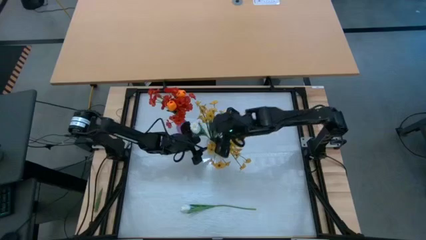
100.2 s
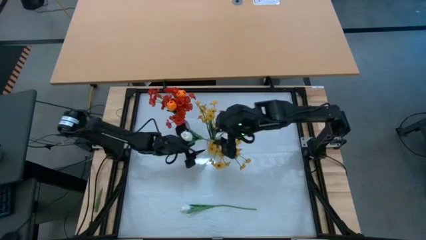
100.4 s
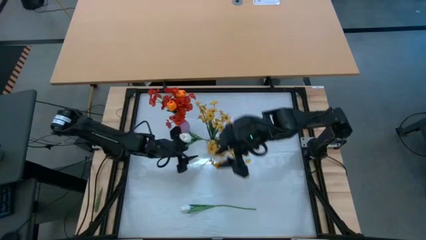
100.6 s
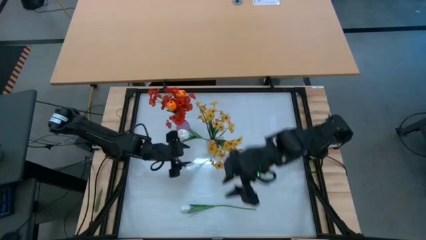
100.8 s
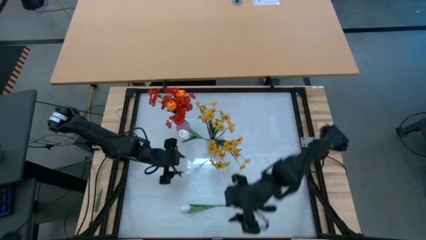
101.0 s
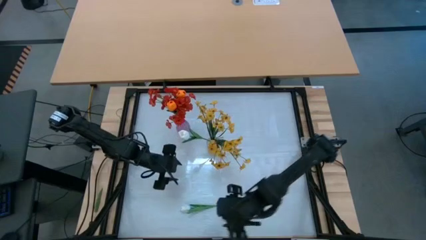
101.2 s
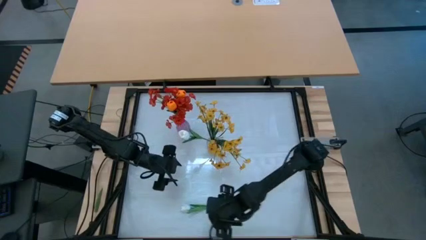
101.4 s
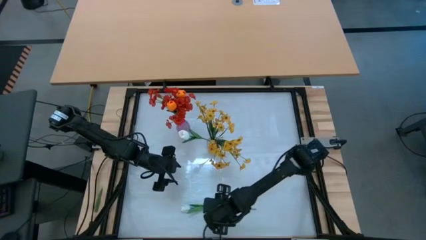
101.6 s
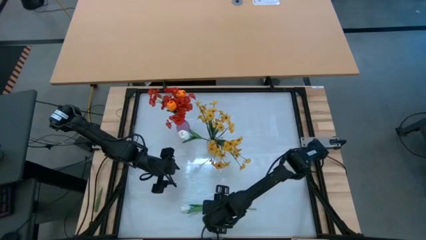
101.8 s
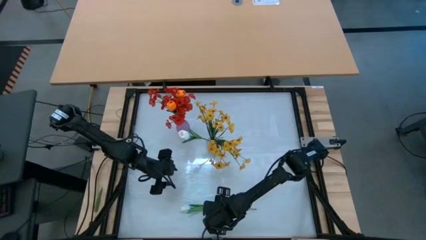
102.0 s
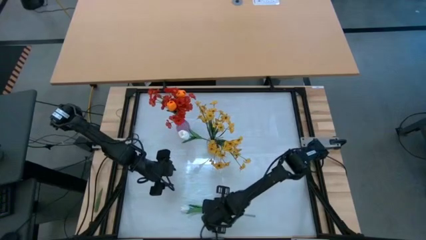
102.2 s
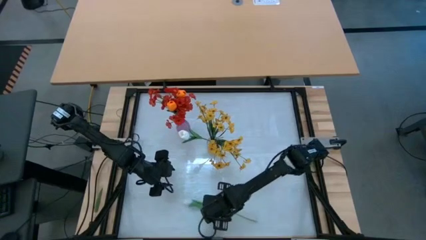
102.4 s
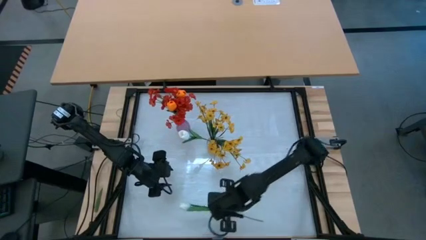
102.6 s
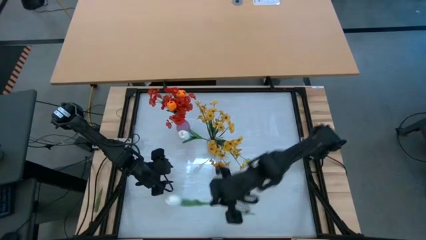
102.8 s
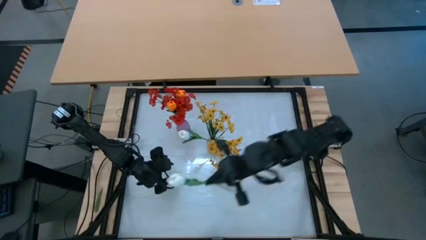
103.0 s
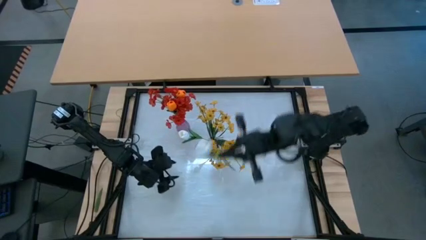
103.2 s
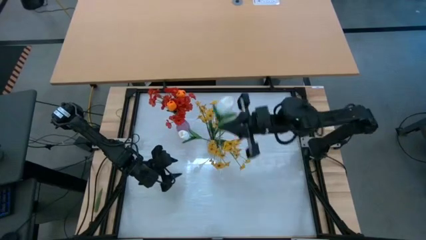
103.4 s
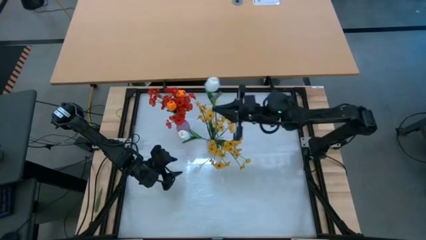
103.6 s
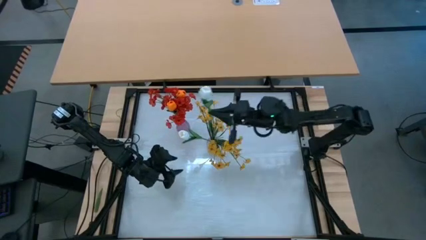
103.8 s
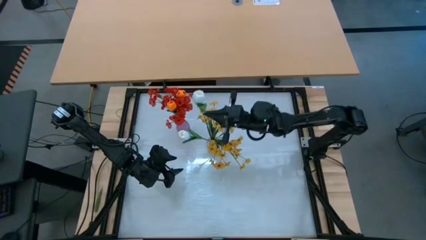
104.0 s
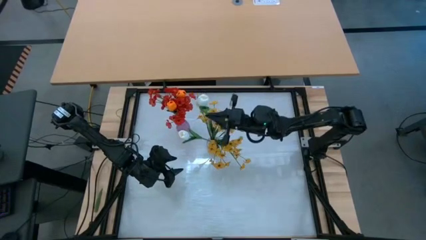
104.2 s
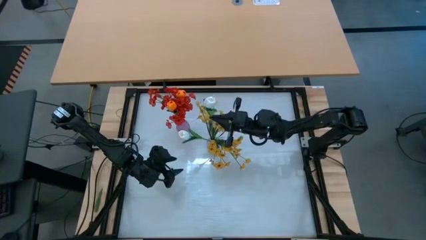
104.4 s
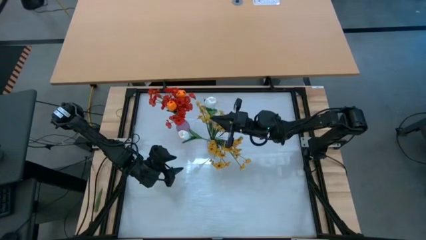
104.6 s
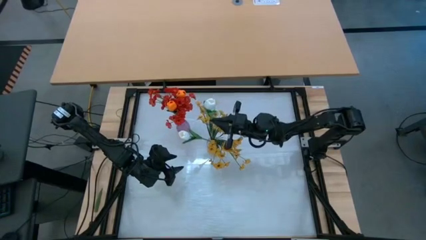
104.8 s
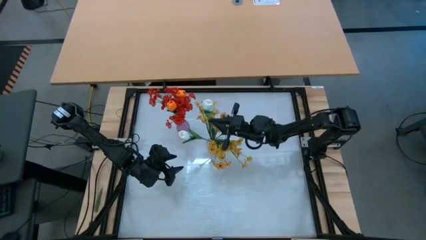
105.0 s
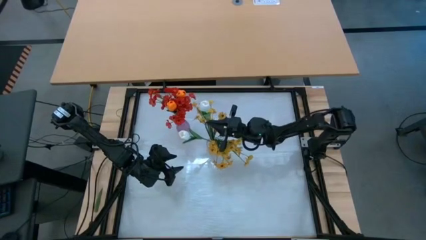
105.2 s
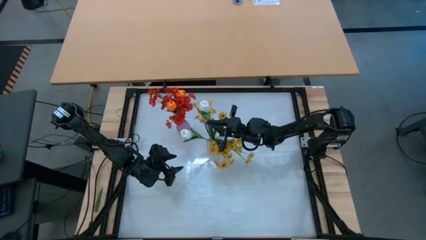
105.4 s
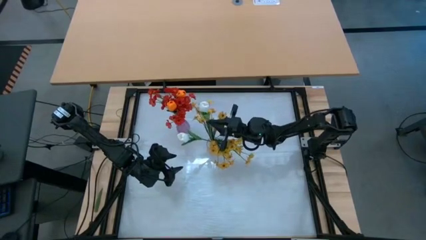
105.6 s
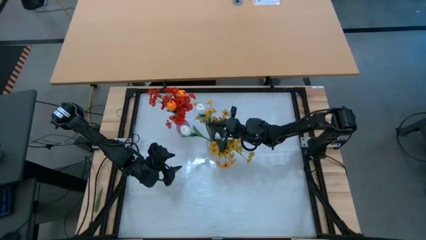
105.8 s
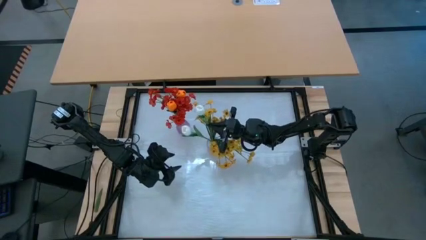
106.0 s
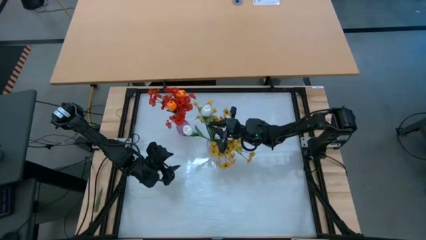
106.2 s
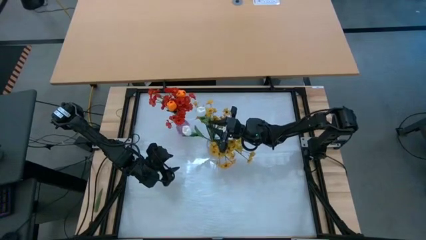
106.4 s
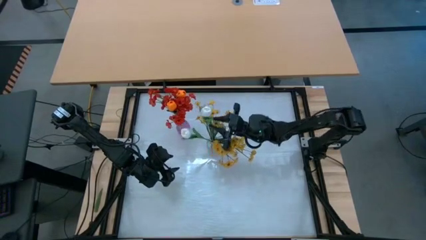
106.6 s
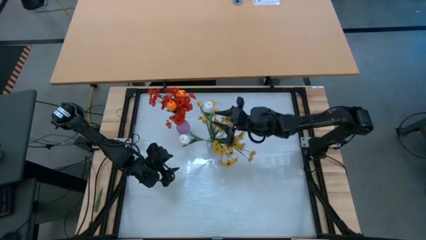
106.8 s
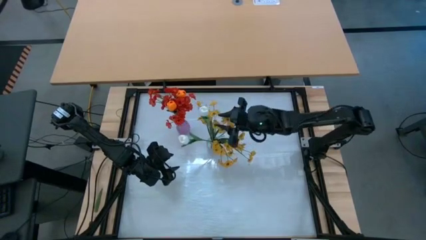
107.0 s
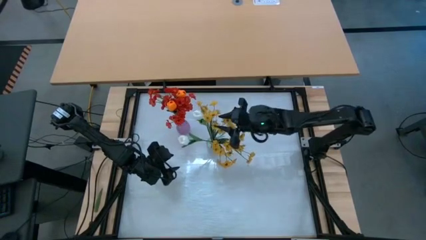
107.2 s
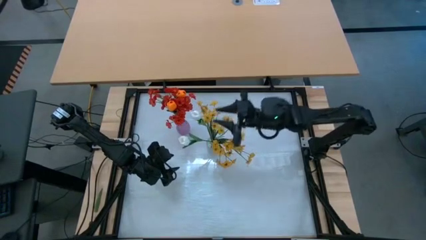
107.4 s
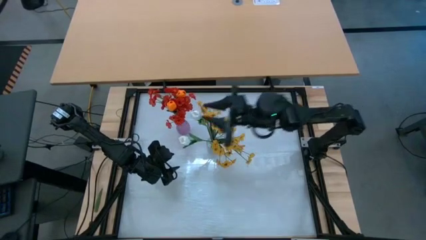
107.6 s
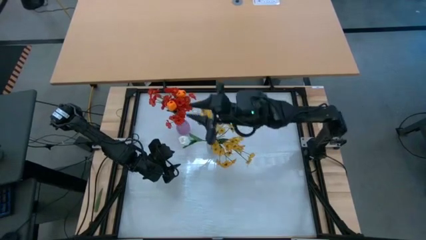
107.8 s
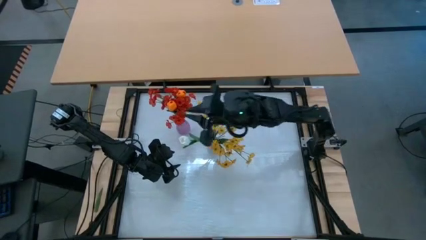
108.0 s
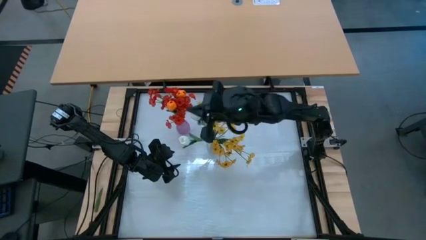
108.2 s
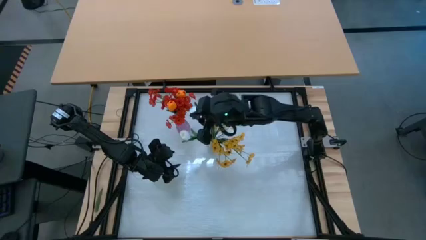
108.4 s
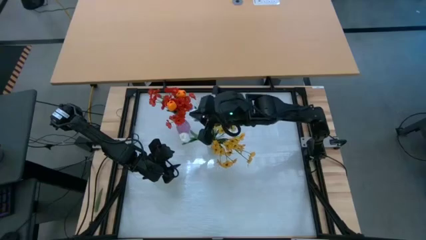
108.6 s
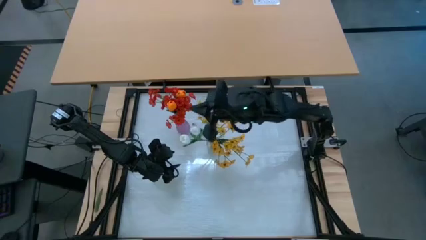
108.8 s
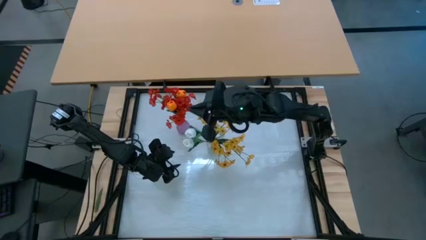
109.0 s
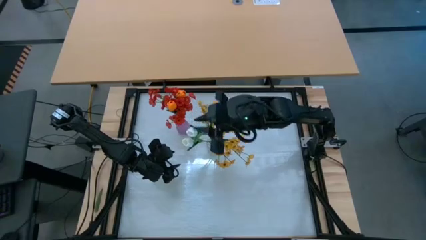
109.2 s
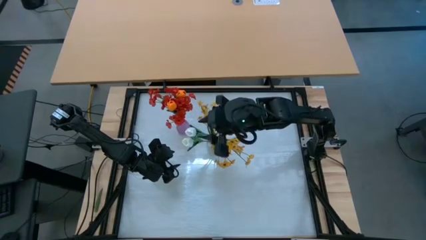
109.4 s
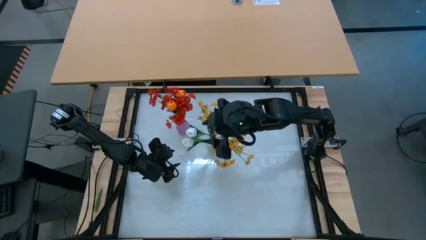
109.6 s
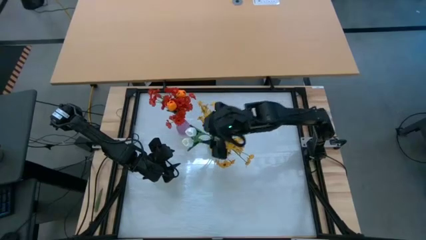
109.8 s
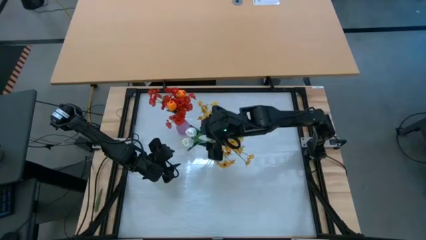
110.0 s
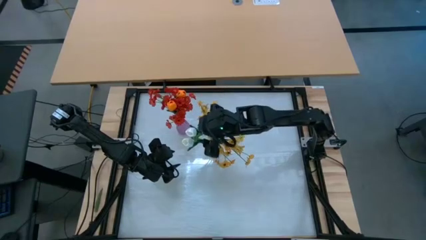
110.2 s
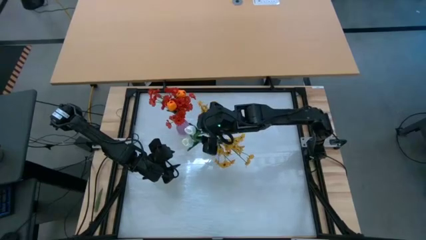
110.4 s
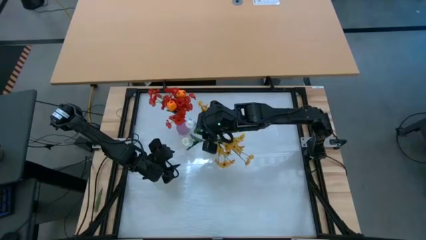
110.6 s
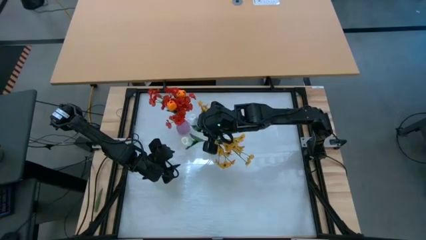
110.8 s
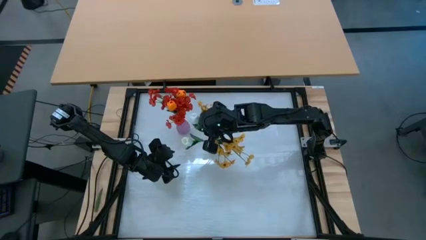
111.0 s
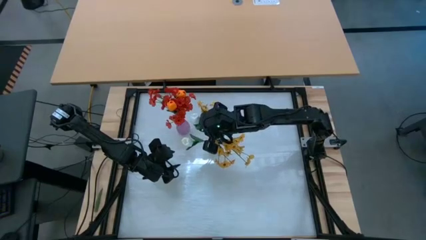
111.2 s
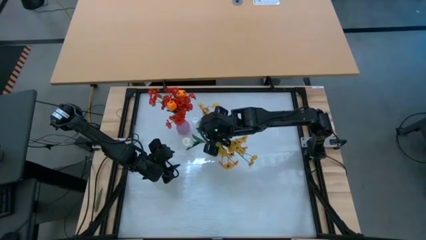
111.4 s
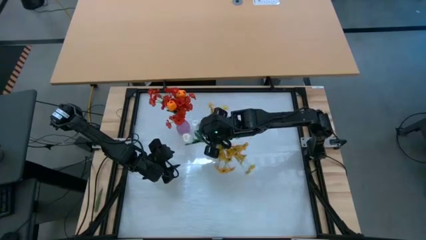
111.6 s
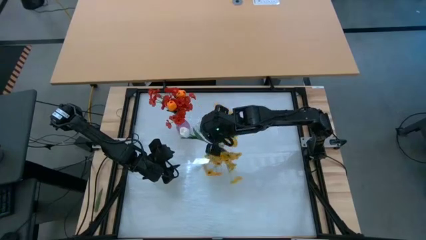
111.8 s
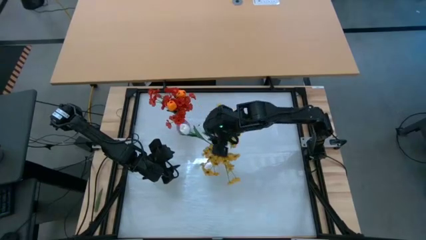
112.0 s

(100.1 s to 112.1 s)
Task: Sort flowers into vase by color
Put the white tulip into the transparent vase
